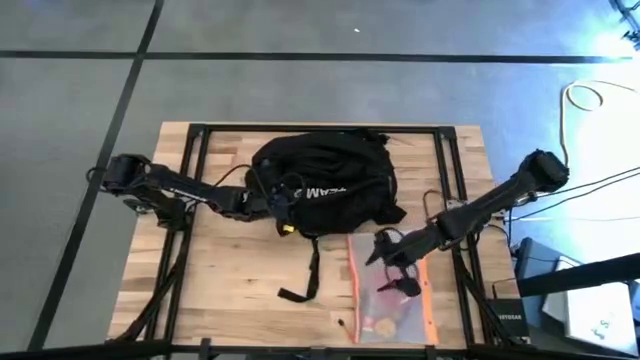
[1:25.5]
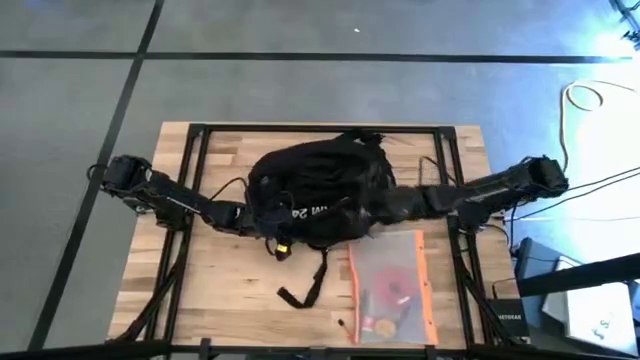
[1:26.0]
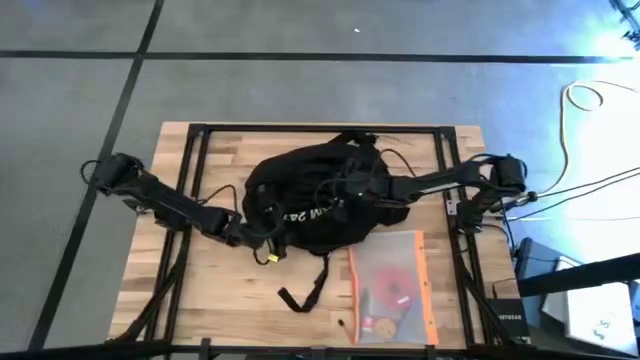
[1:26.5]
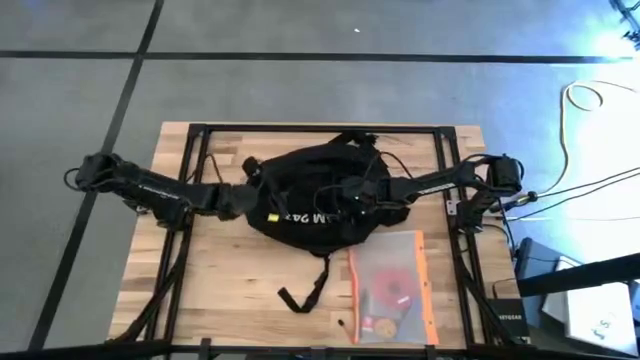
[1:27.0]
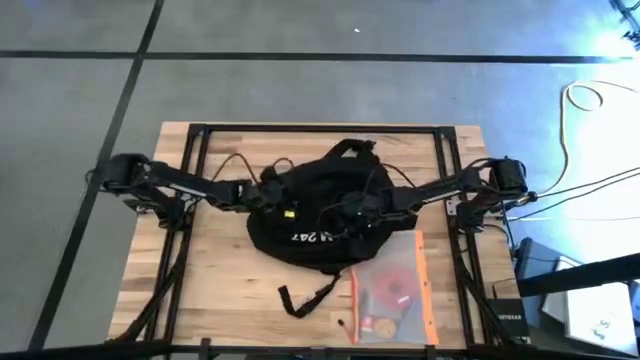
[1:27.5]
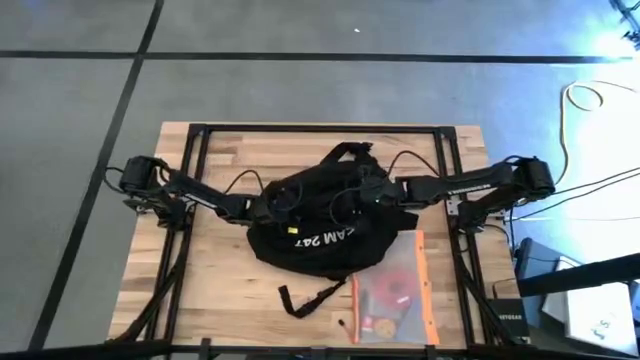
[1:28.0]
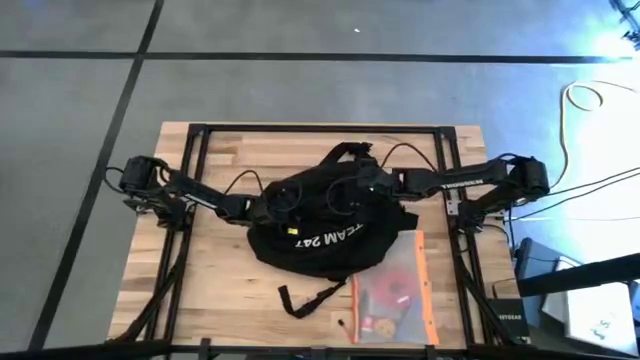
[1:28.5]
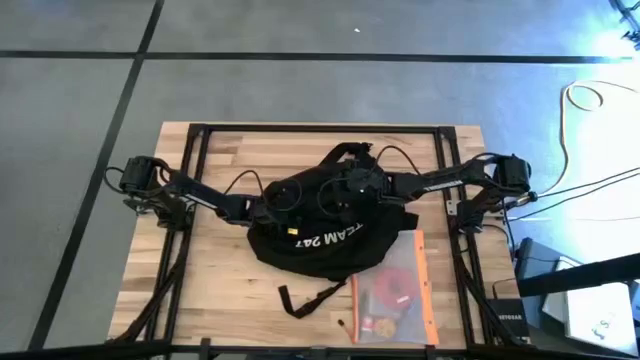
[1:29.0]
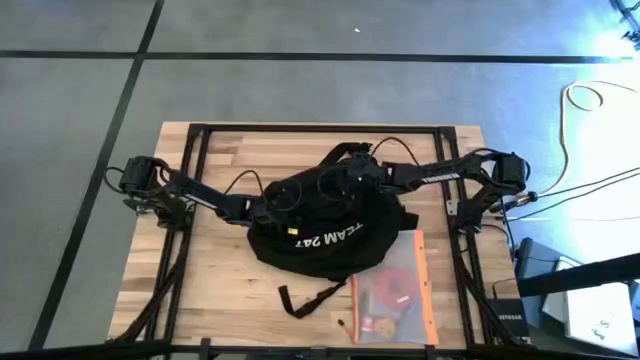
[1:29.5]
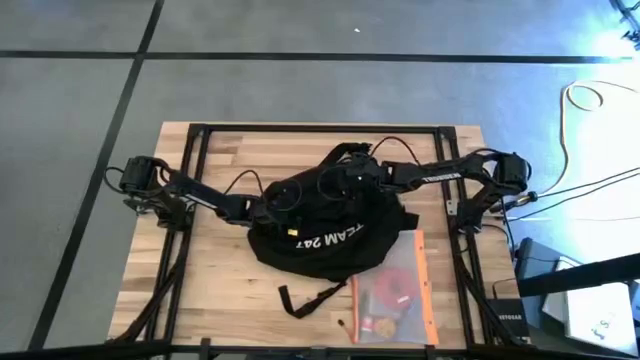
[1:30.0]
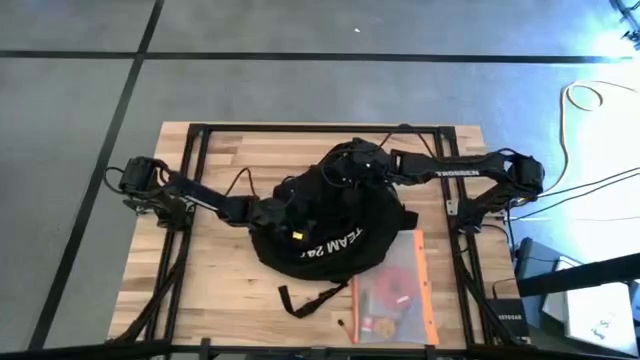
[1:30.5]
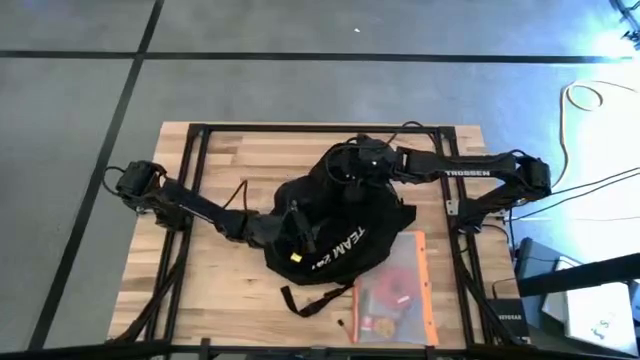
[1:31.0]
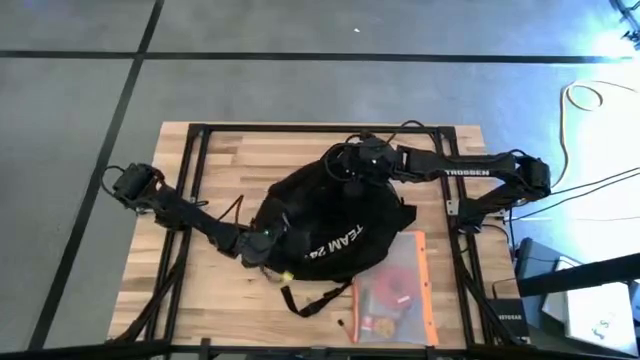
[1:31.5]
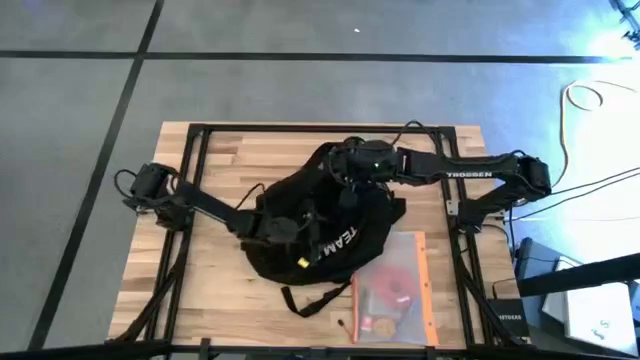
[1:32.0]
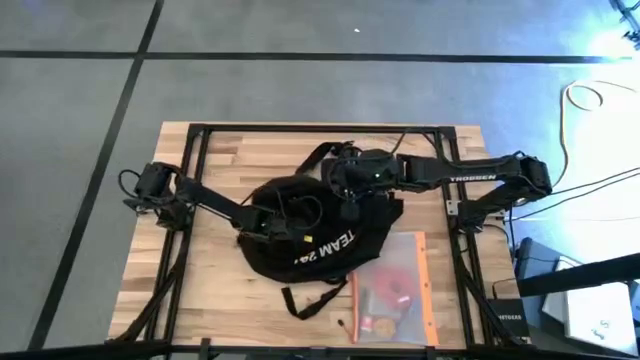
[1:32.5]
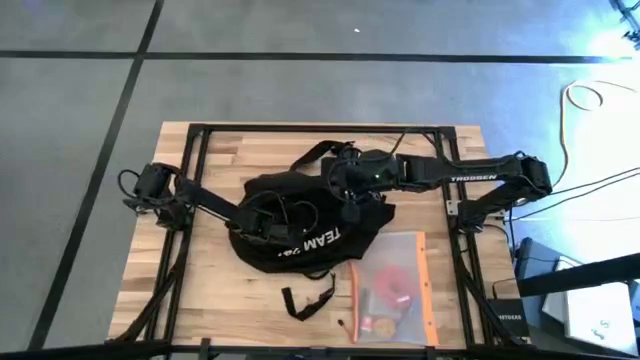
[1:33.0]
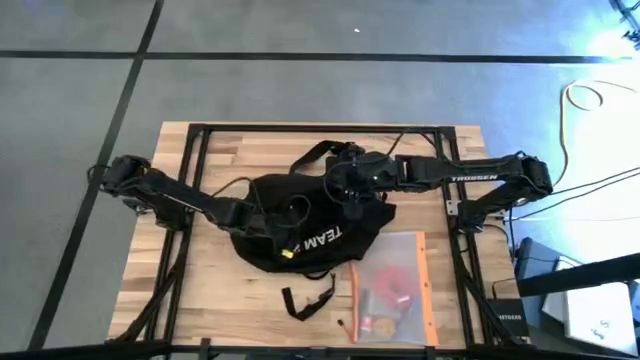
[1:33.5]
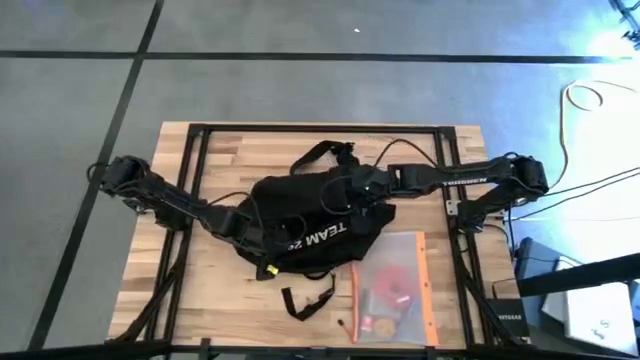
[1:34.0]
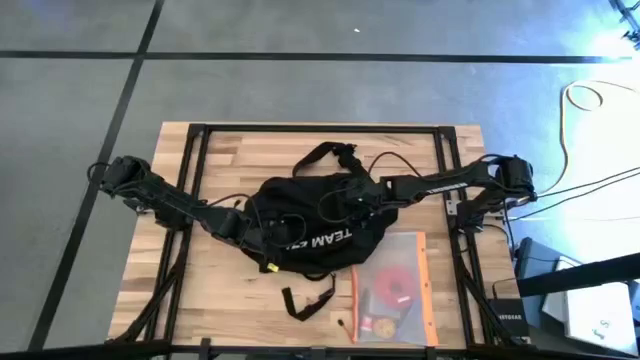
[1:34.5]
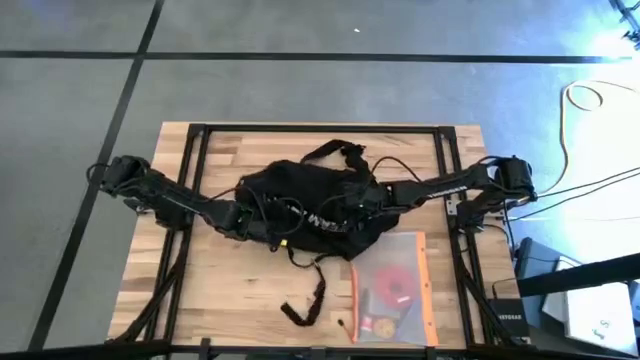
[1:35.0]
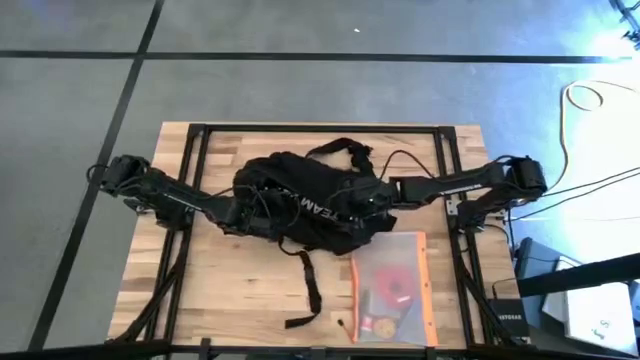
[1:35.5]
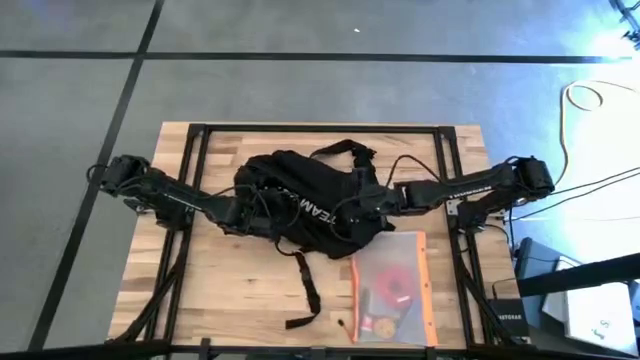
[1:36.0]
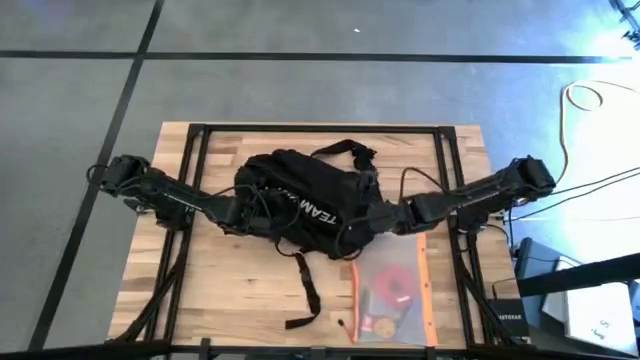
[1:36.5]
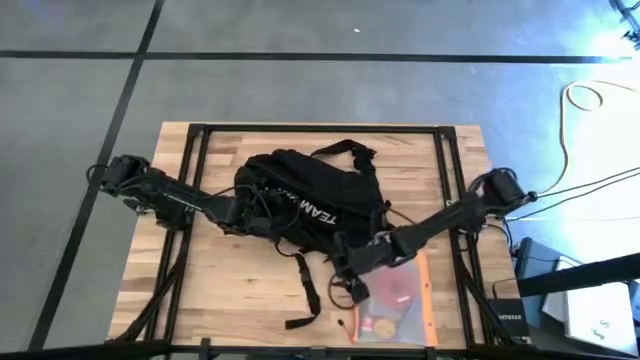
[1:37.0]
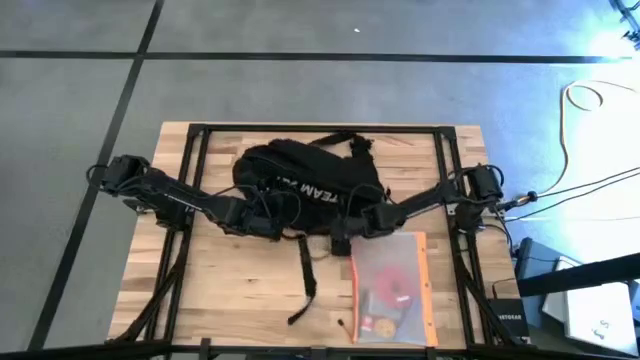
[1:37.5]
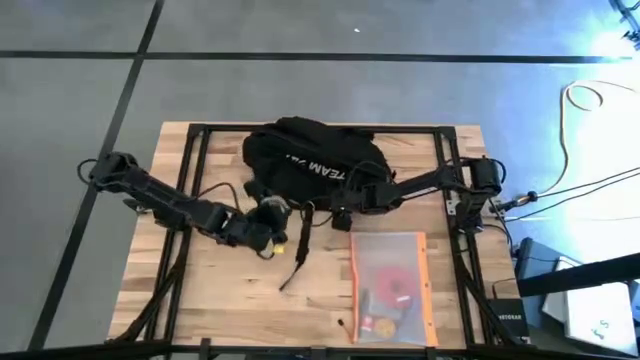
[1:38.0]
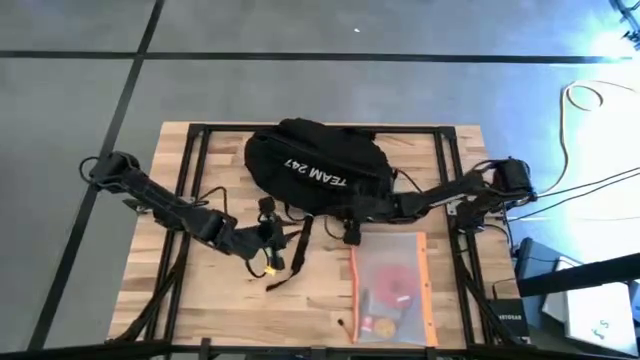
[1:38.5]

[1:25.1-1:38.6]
Task: Unpack backpack
Move the black backpack to the top center of the table

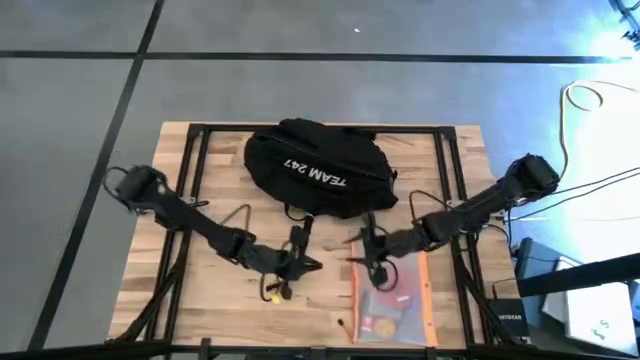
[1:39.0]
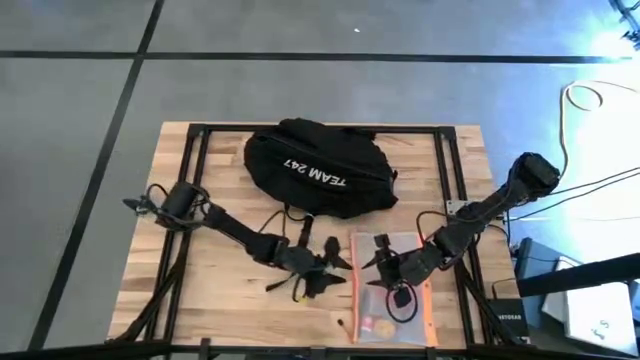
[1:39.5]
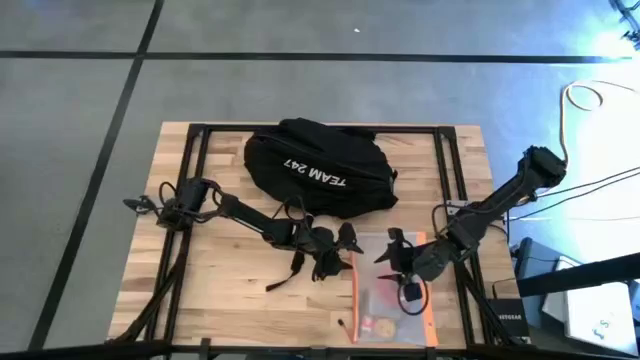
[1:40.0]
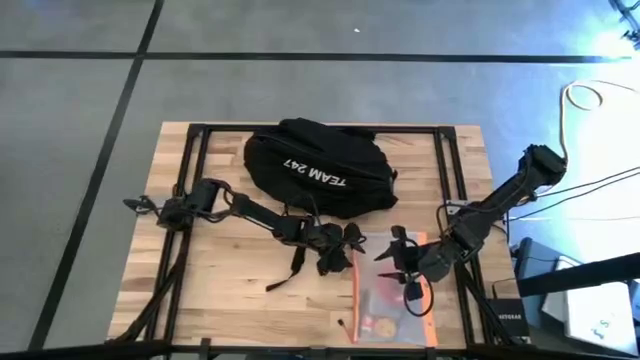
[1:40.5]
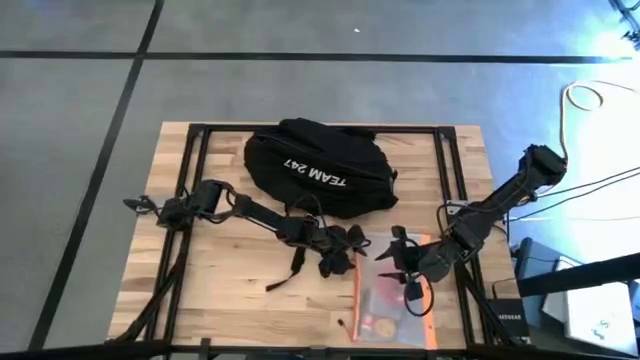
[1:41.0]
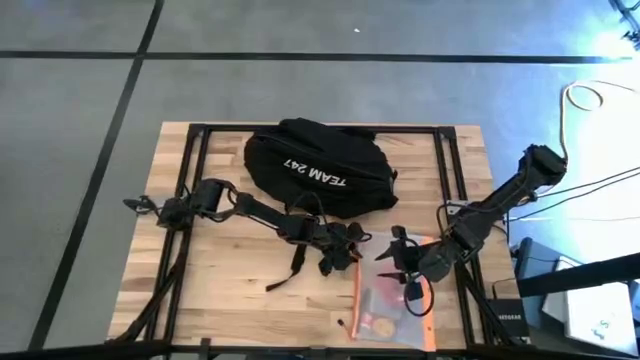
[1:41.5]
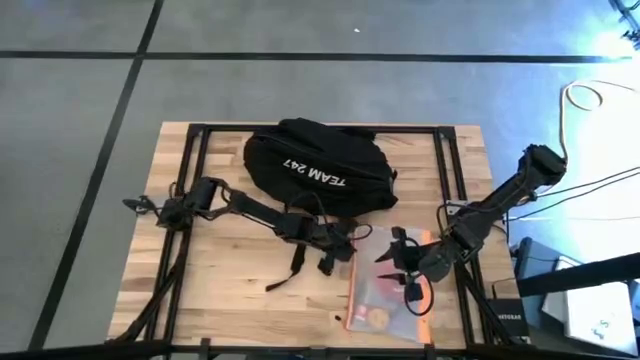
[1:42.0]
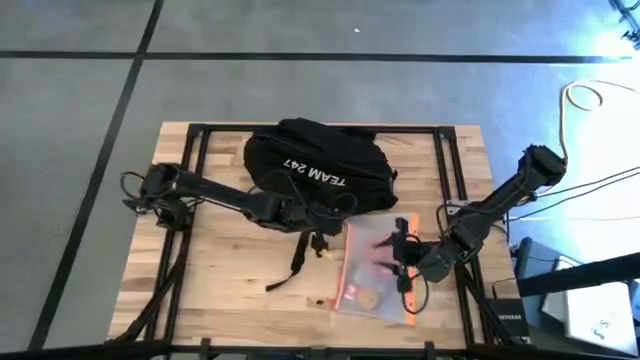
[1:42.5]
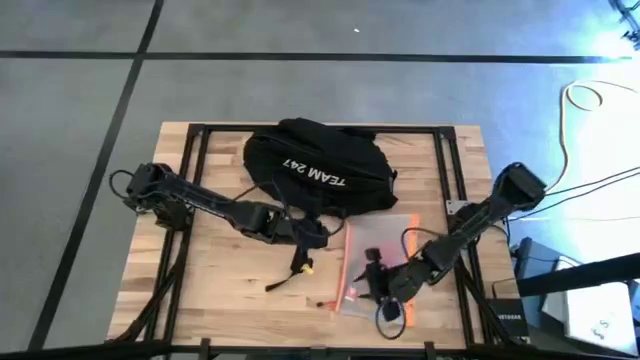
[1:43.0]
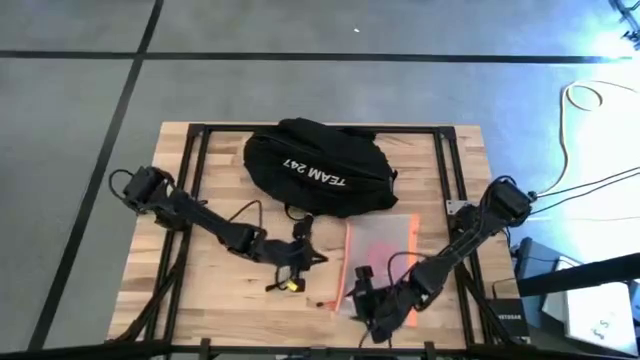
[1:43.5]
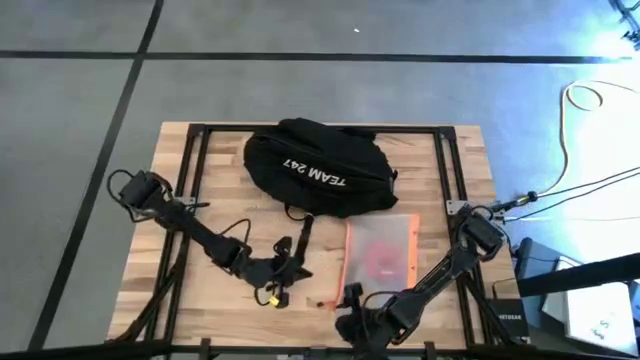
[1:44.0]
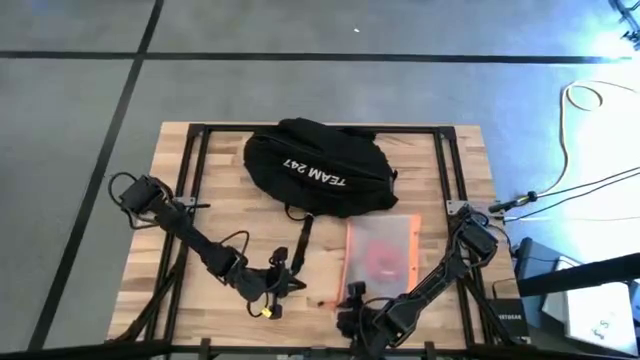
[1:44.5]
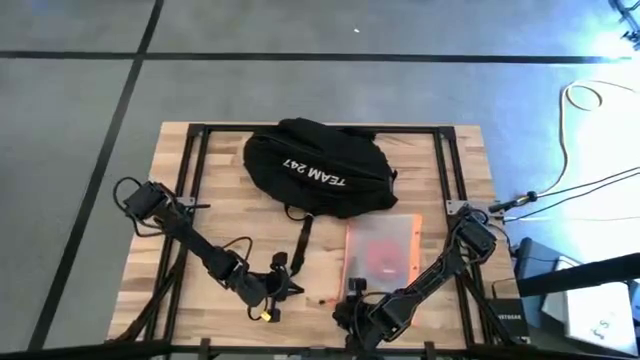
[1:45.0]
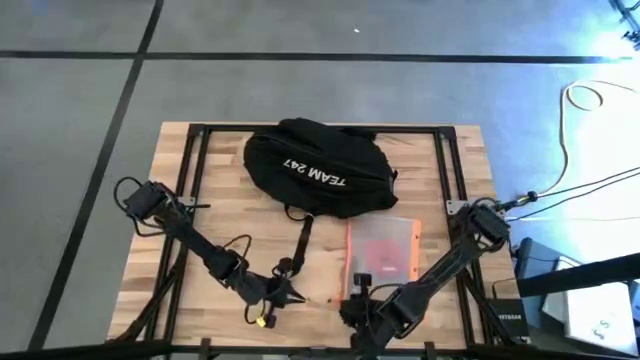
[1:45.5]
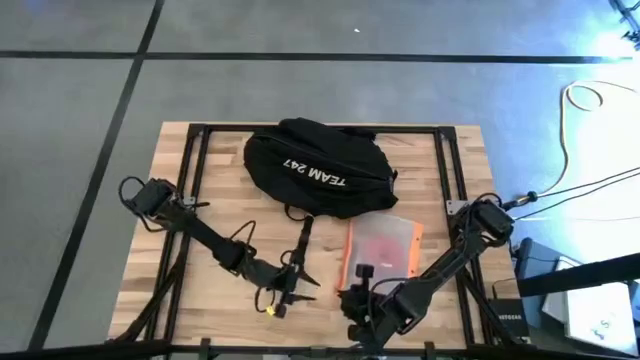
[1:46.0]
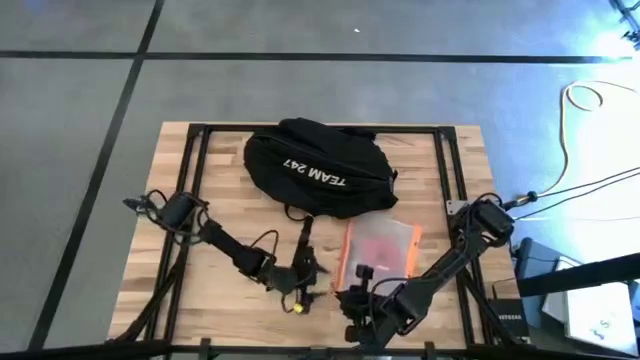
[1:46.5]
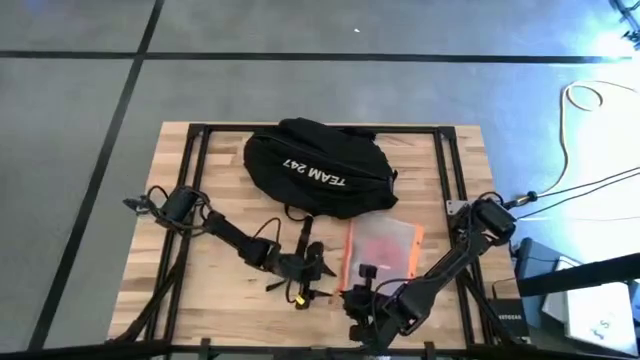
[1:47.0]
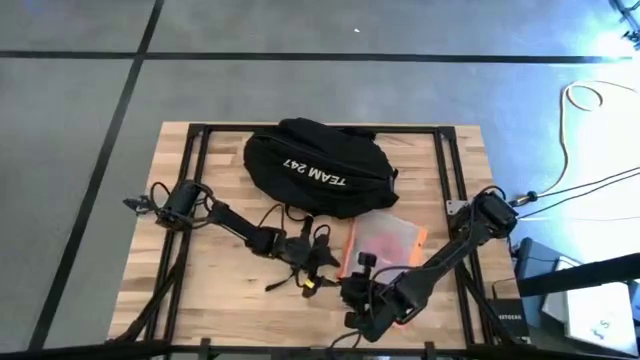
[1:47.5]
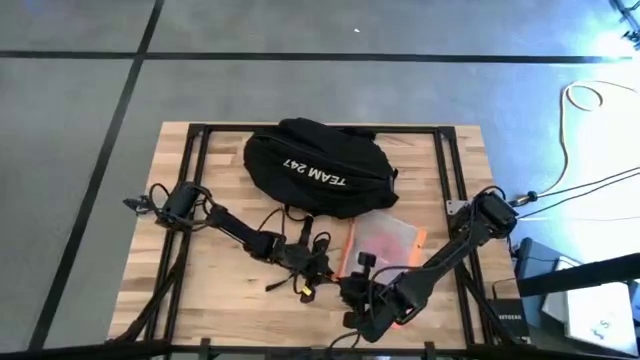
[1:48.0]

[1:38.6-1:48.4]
Open the transparent white zip bag
